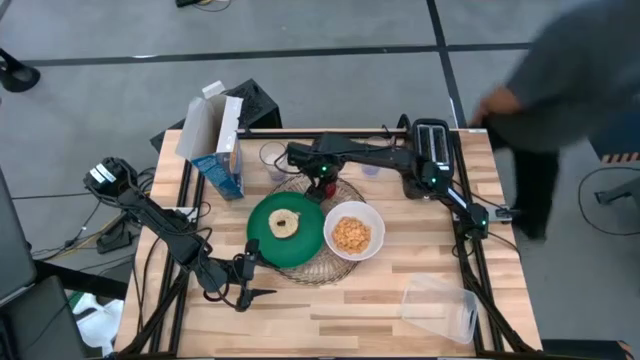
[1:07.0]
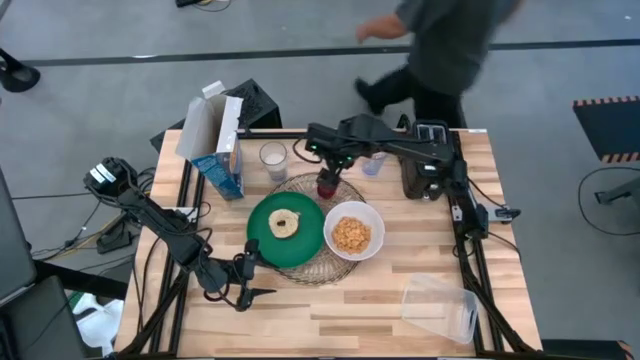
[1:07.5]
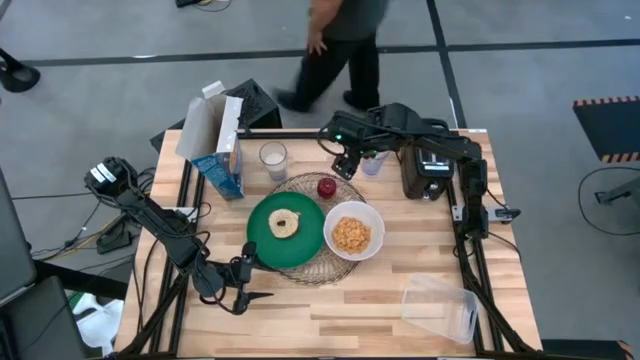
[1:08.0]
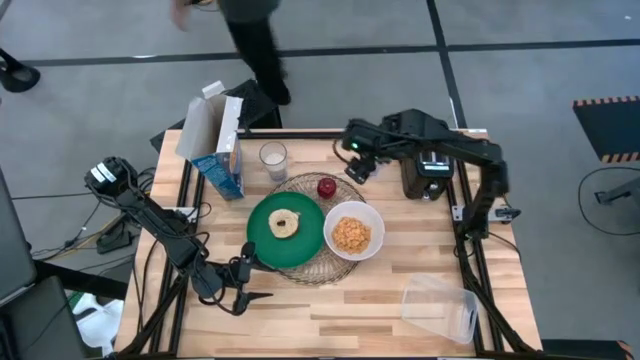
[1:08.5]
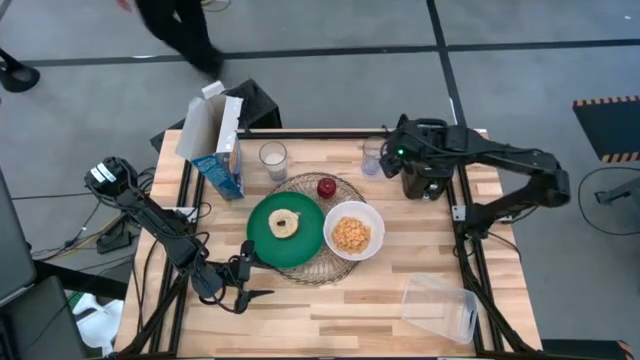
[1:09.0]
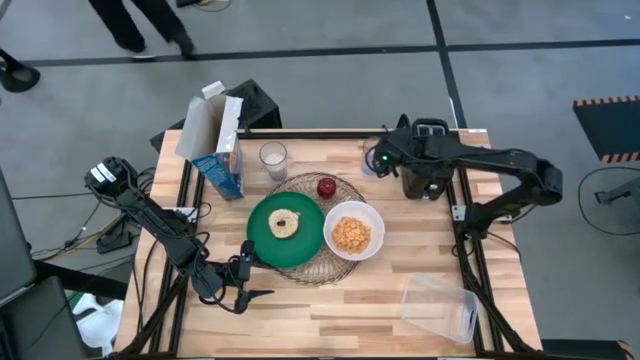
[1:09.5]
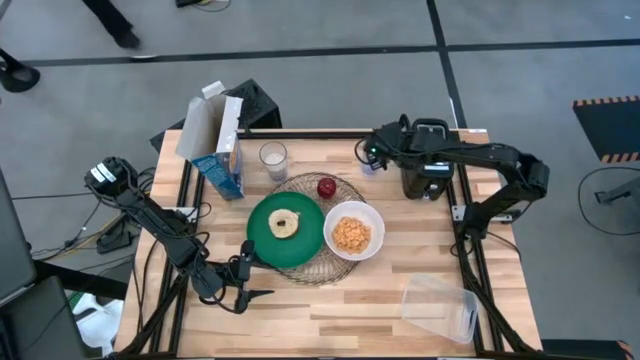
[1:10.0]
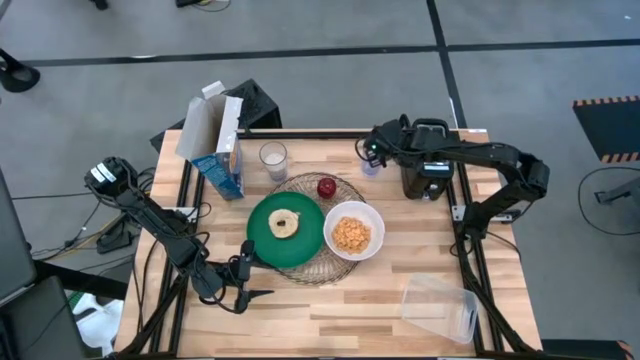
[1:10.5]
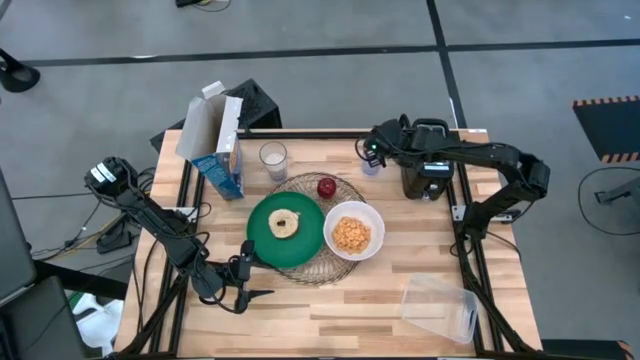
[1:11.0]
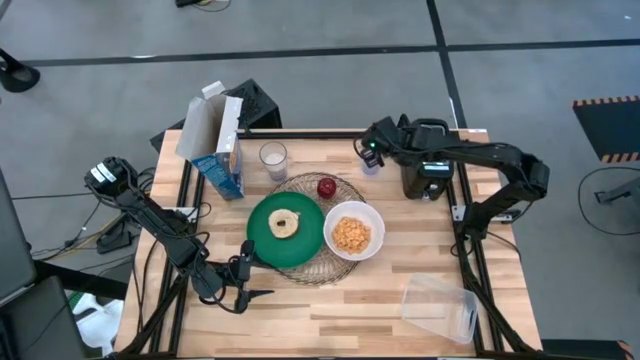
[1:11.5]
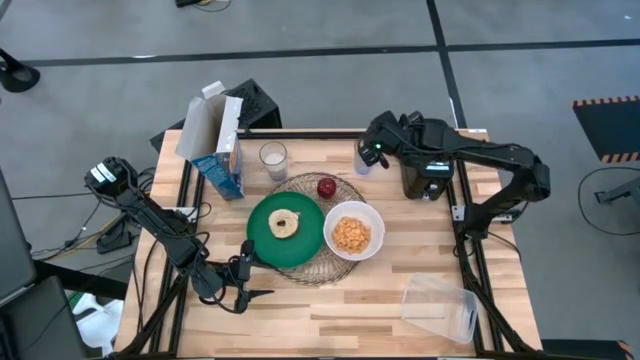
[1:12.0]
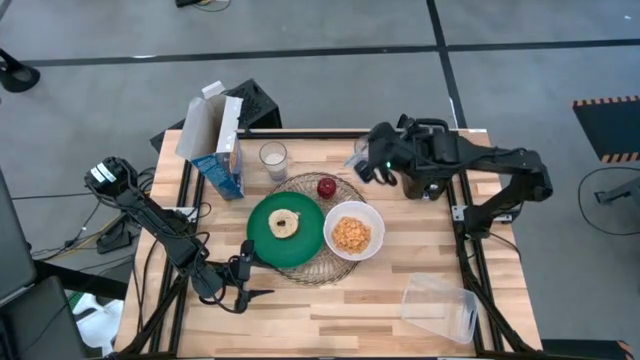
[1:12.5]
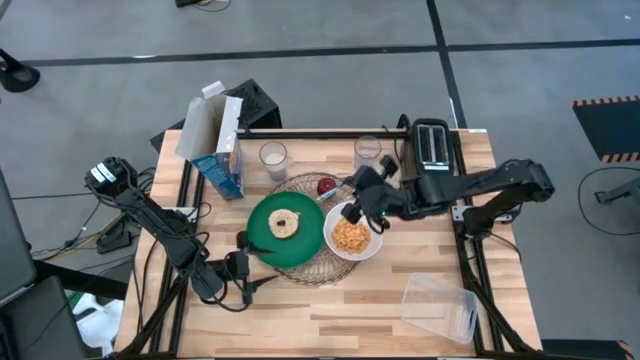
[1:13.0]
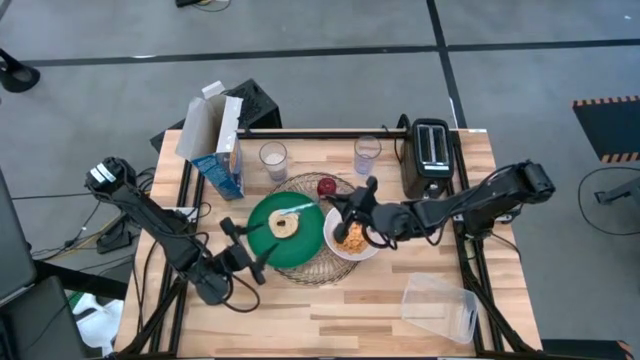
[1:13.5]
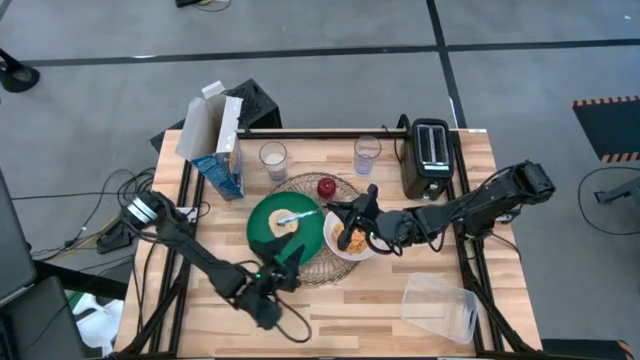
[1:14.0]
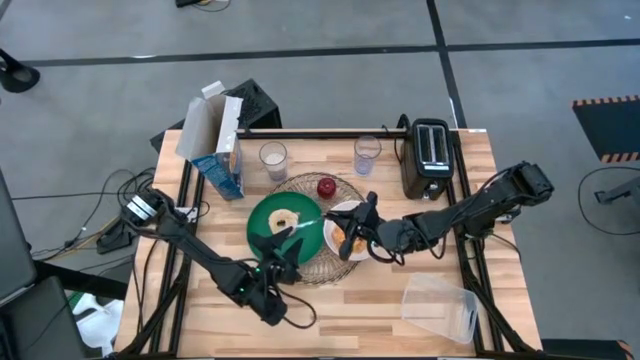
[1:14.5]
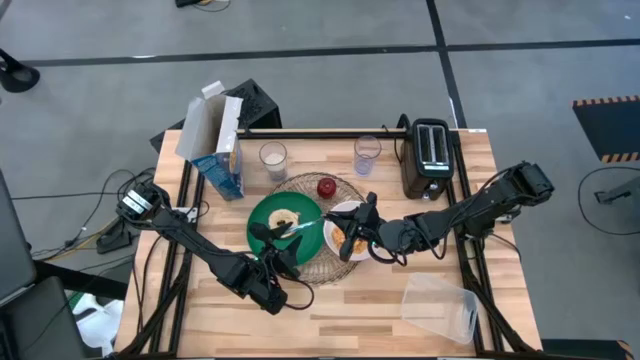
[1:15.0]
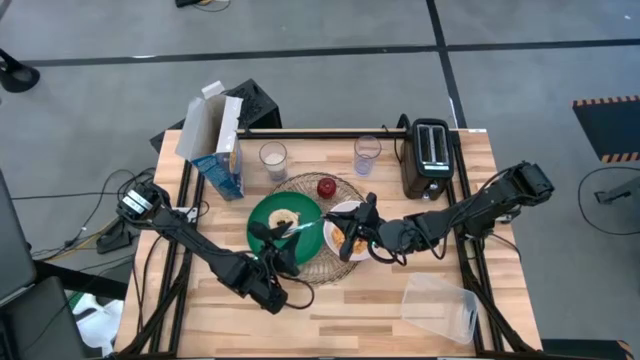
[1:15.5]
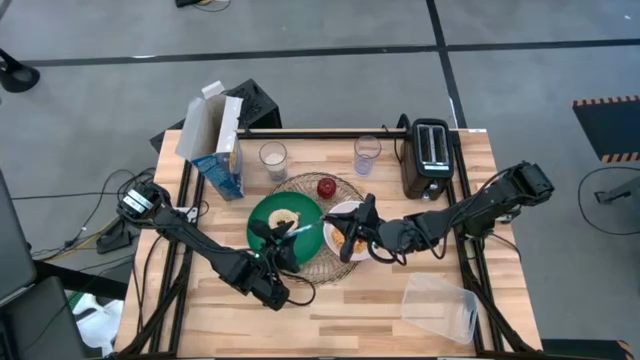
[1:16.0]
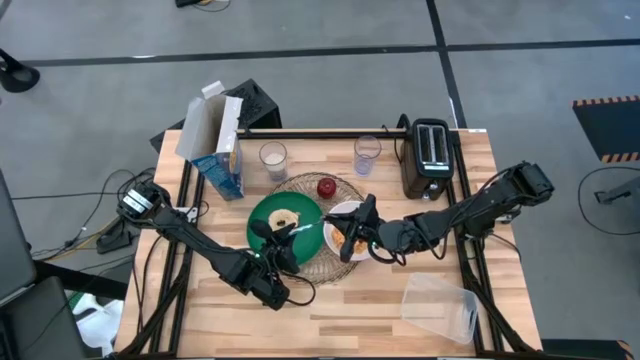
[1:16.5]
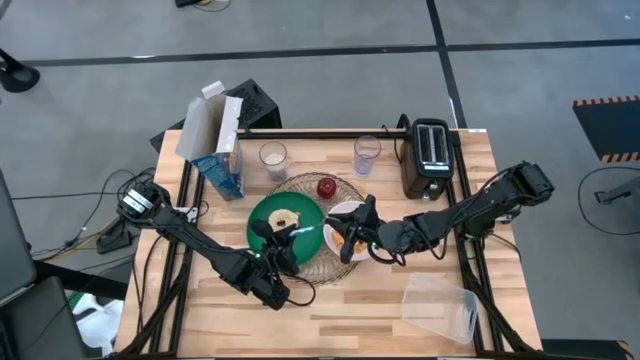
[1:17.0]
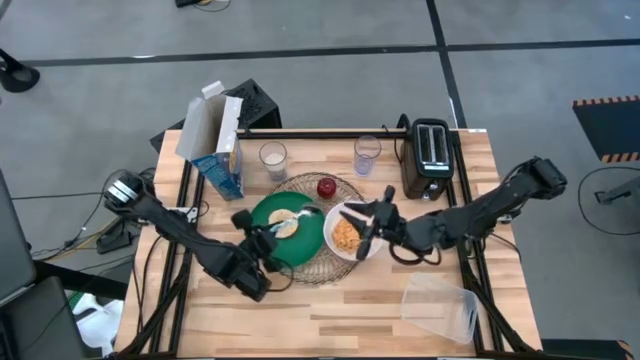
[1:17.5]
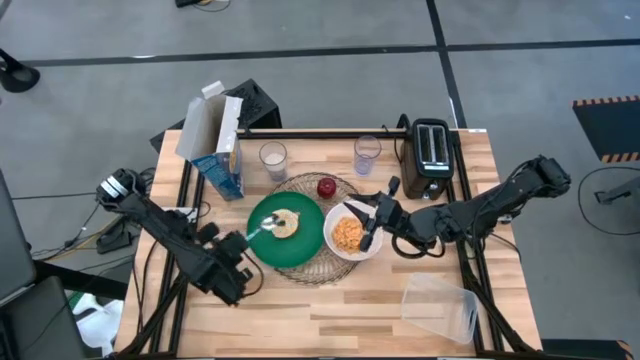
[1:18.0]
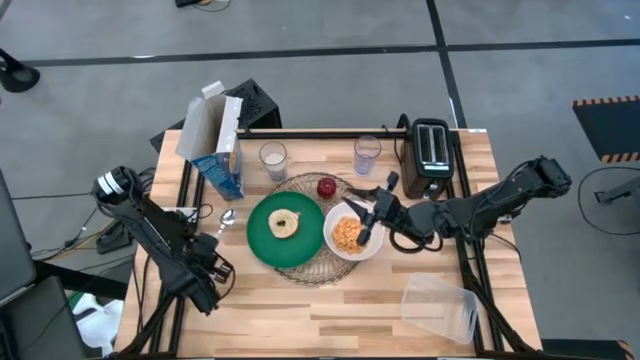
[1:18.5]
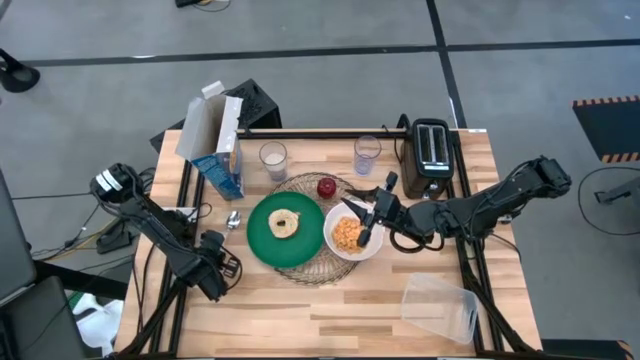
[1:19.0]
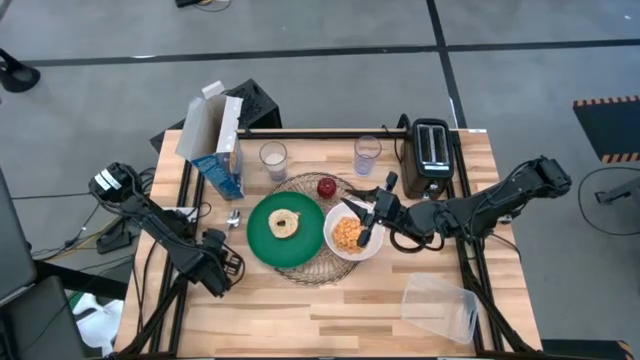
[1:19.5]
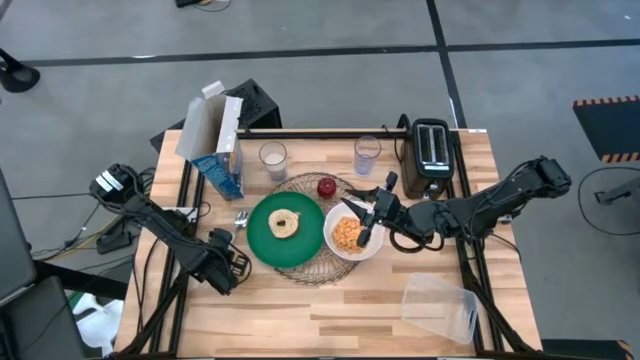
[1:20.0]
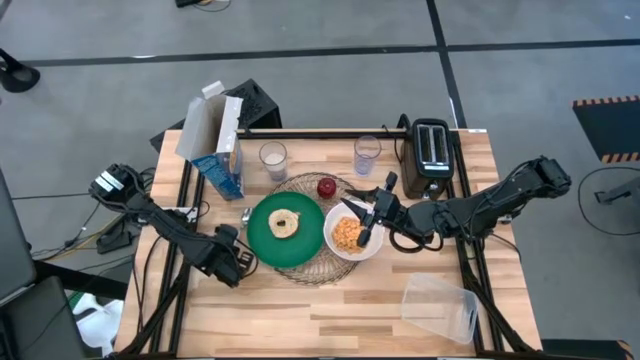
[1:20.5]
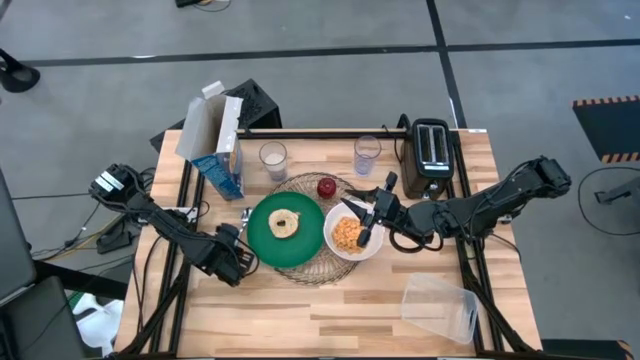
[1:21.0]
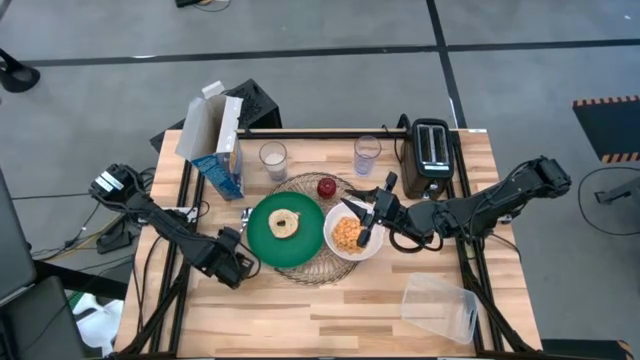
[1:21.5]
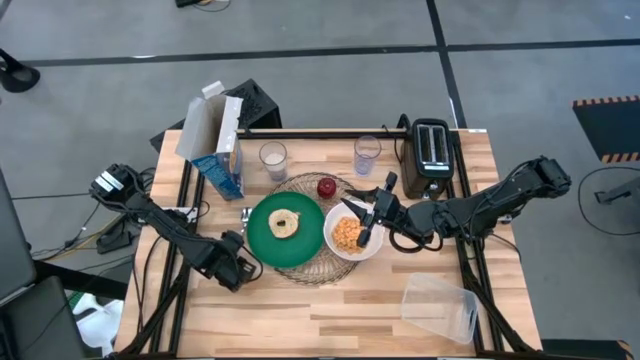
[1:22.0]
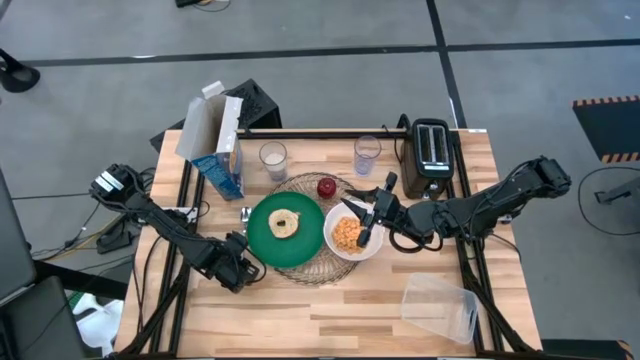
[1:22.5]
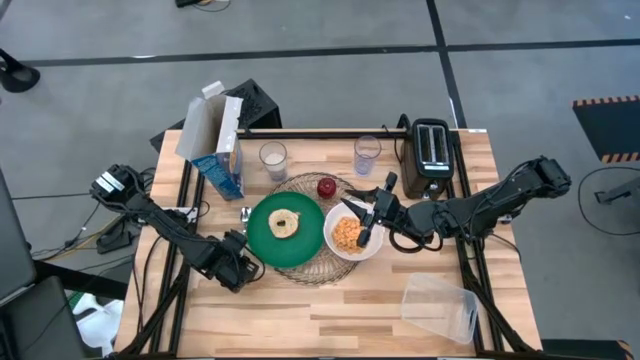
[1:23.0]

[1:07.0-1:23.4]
Task: Arrange a breakfast setting
Put the blue patterned spoon to the right of the white bowl

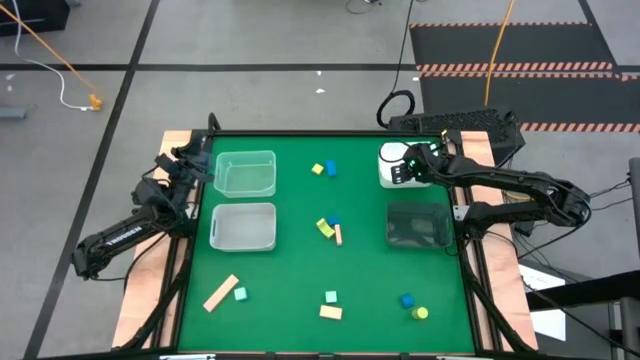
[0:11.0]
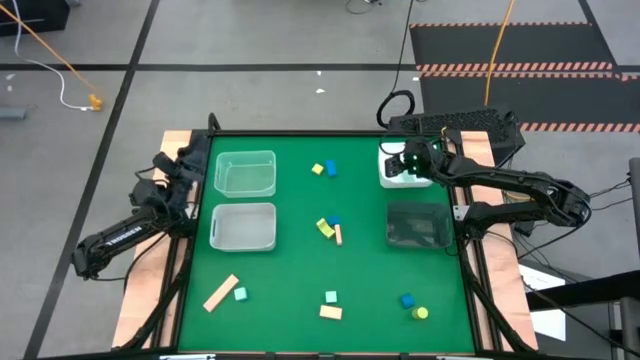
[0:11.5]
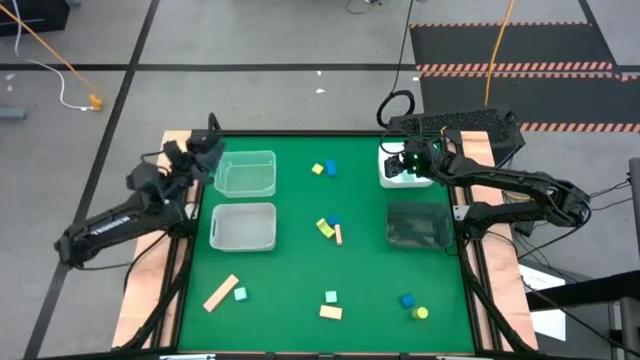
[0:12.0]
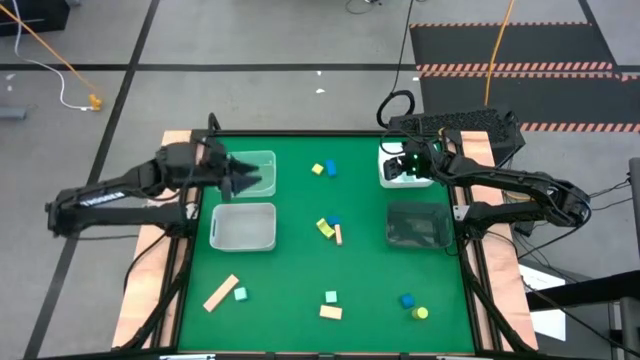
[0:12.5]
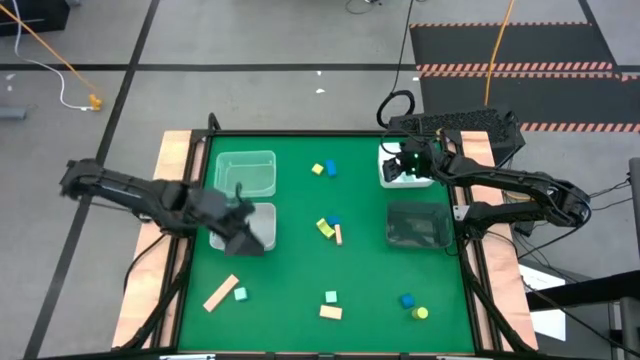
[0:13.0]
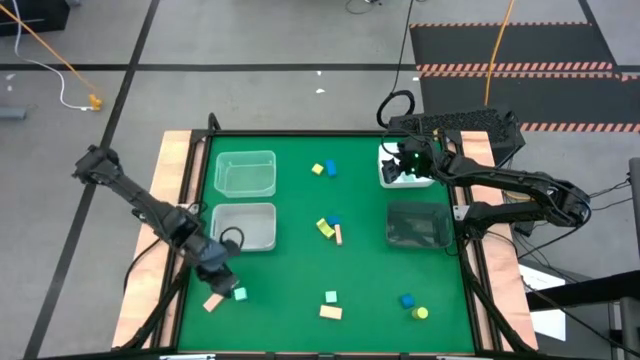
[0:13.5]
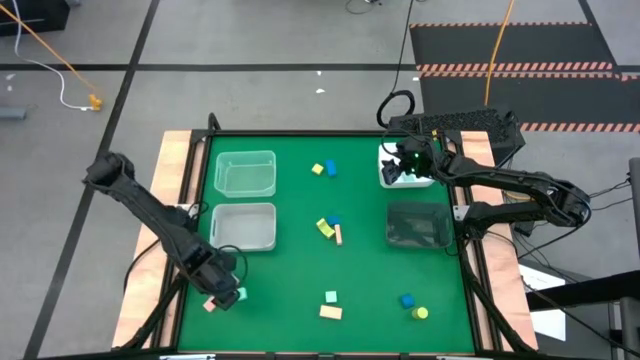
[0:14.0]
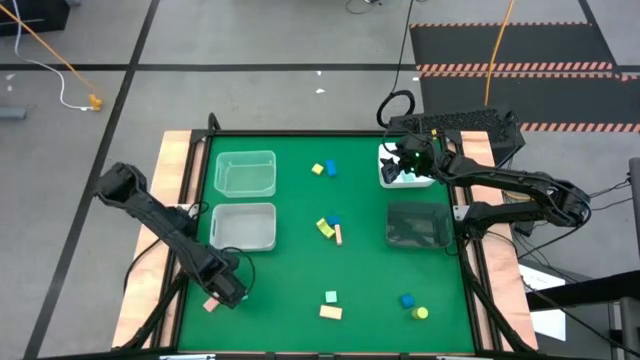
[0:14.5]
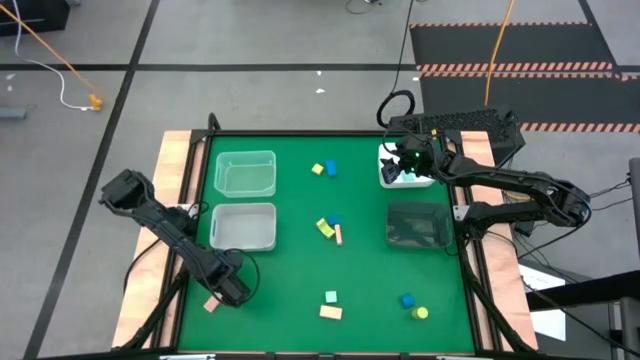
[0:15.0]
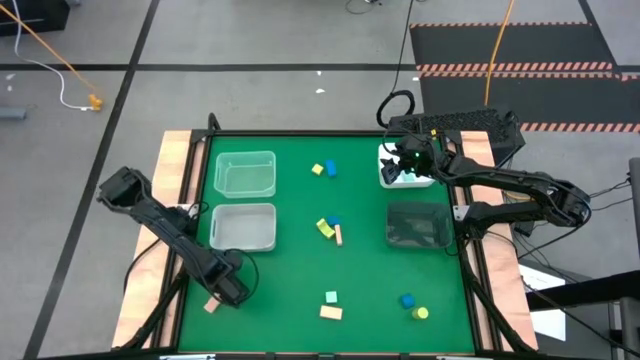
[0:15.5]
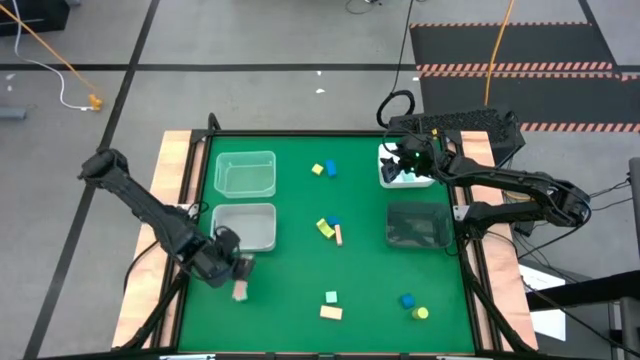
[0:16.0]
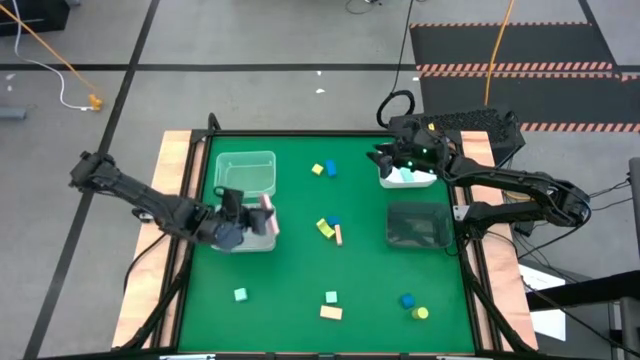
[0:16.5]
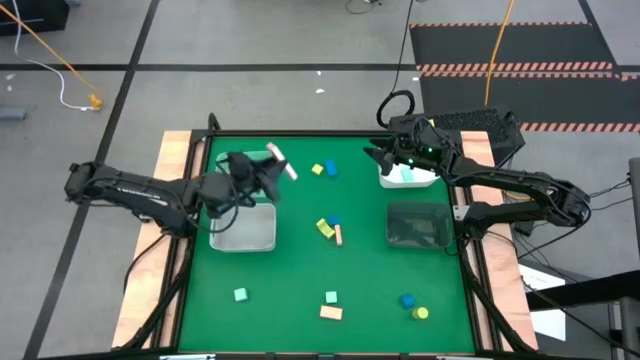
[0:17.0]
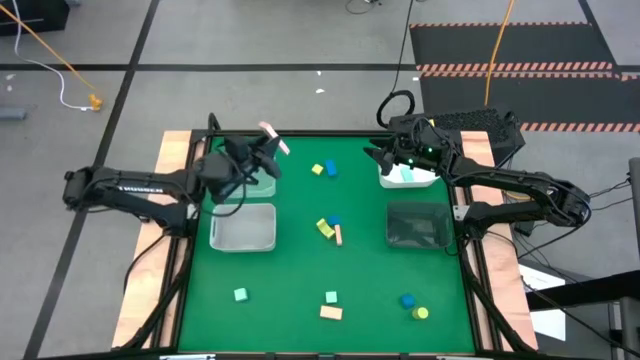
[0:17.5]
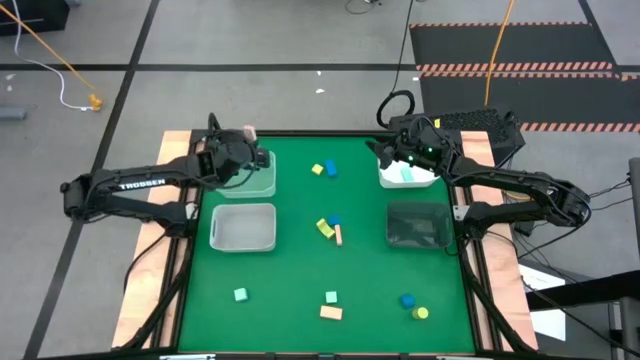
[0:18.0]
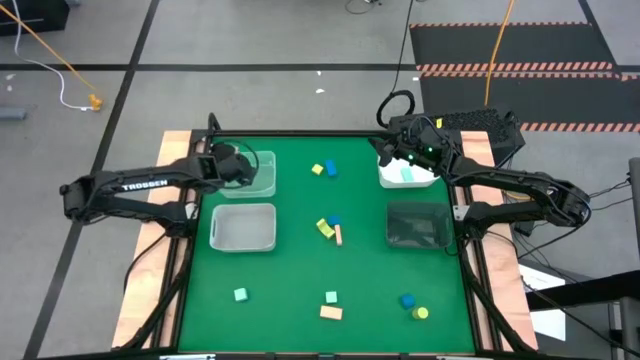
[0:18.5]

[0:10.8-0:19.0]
Task: Sort & place blocks by color
Put the left brown block into the transparent bin
